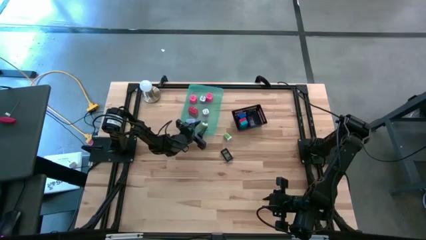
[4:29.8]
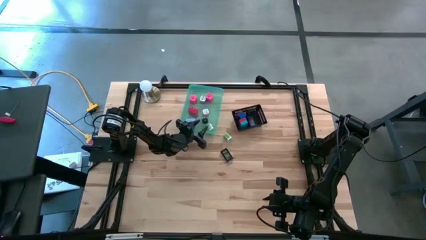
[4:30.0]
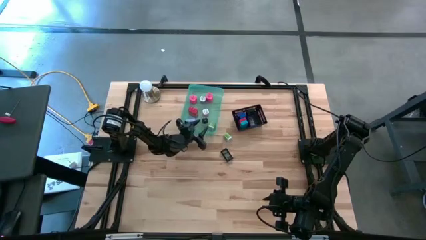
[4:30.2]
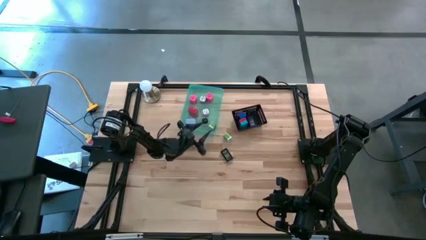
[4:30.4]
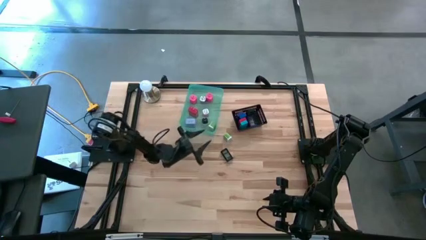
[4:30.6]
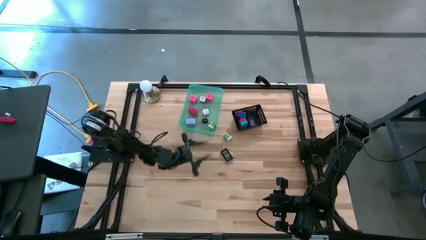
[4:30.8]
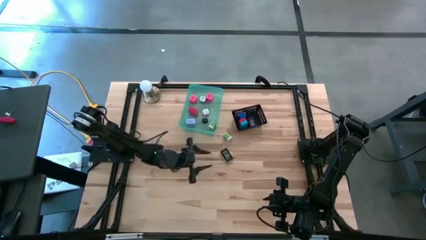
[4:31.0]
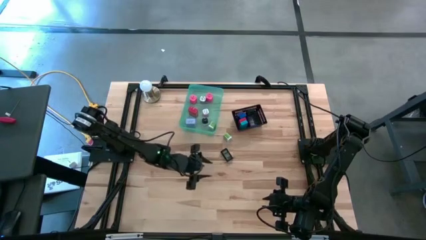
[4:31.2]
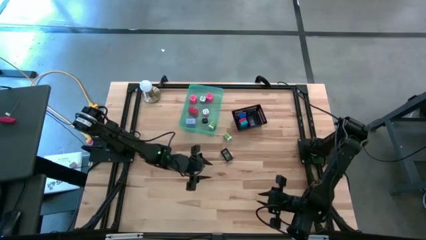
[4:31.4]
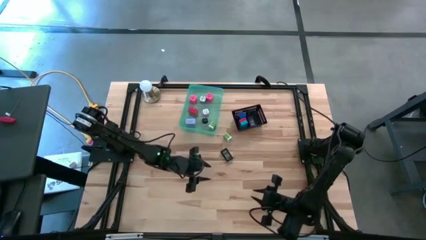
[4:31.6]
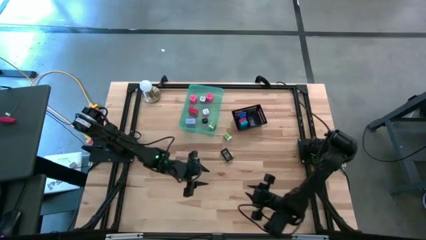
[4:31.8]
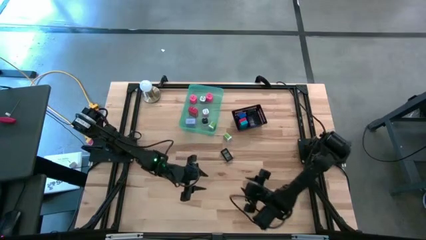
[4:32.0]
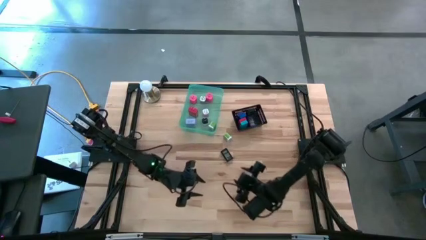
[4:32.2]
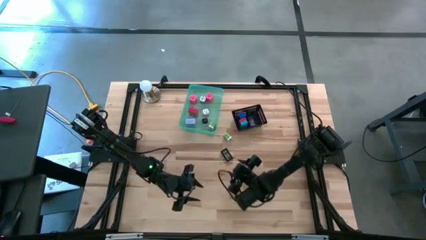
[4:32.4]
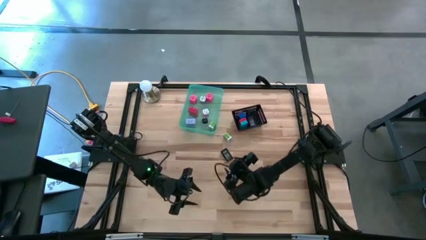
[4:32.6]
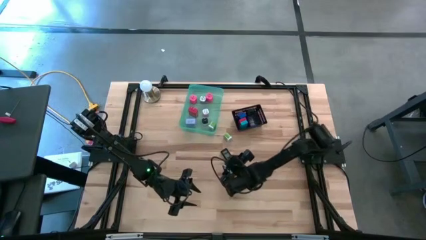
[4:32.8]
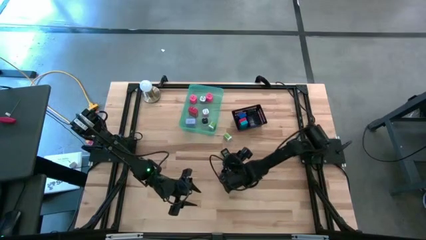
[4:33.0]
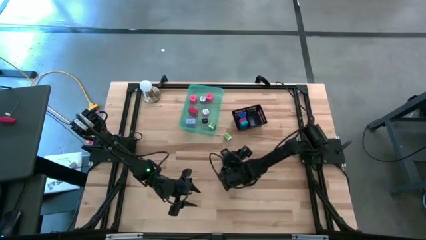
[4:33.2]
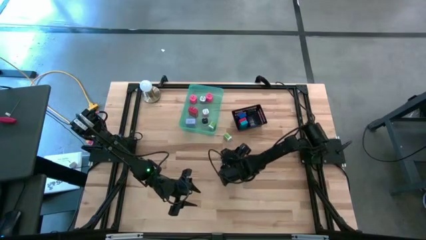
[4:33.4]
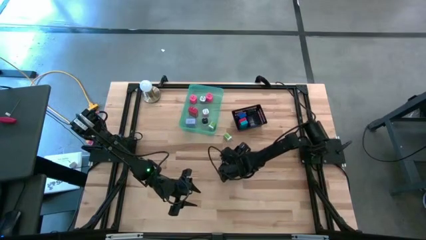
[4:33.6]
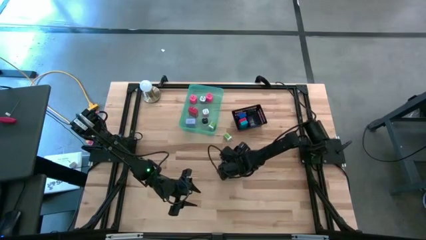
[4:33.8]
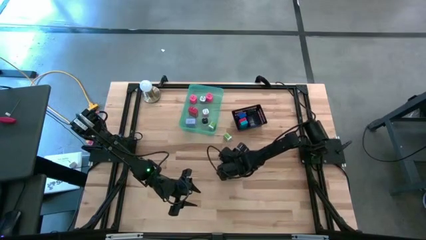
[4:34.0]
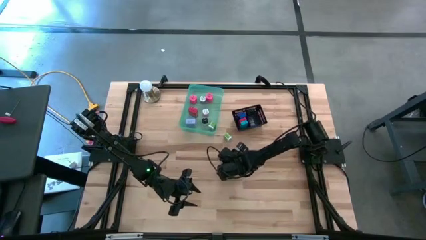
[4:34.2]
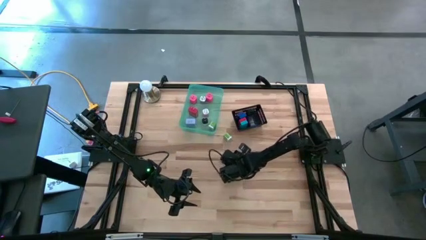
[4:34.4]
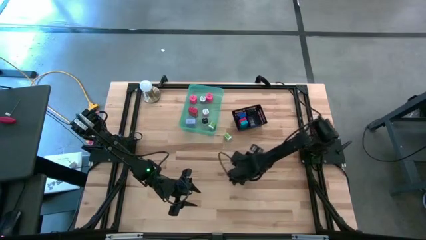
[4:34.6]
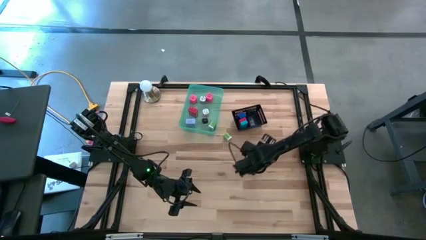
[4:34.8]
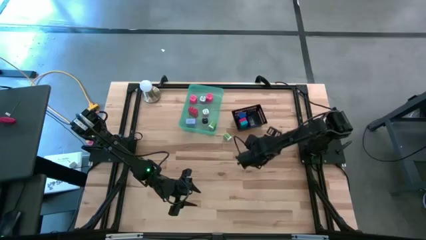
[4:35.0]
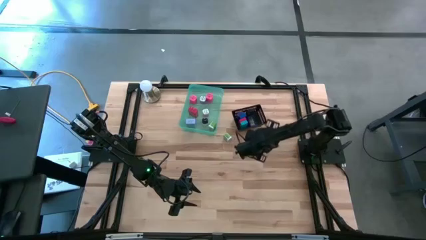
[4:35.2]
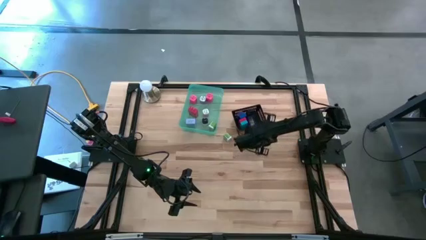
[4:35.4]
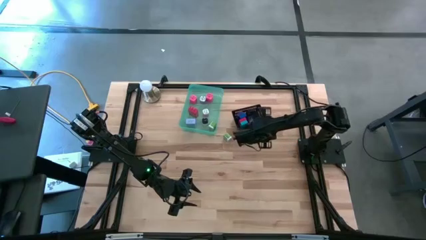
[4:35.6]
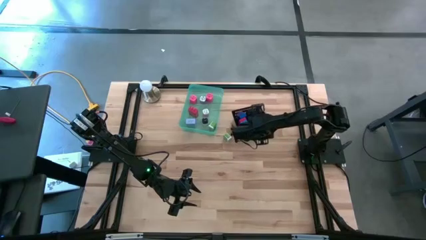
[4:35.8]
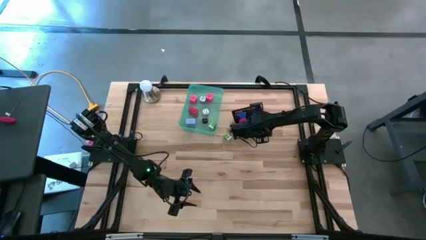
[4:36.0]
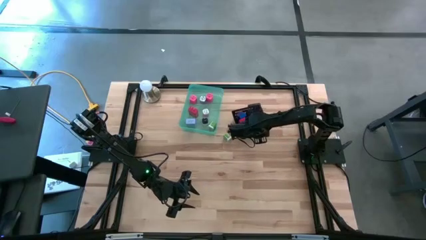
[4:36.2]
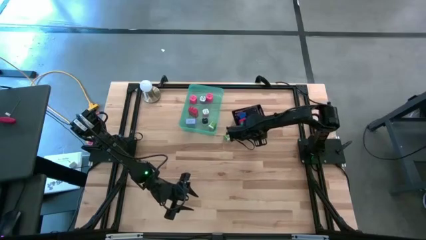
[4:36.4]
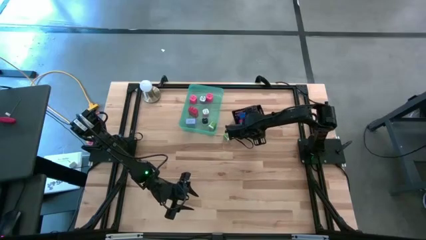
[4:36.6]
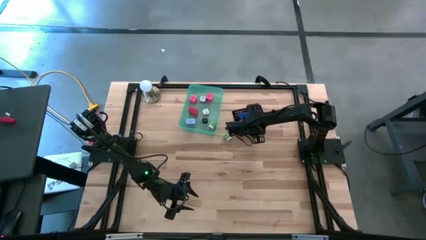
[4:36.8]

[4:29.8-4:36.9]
Task: Pick & Place Office items
Put the black digital clock into the black bin

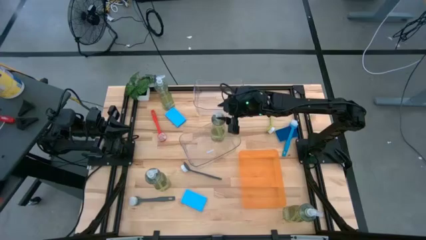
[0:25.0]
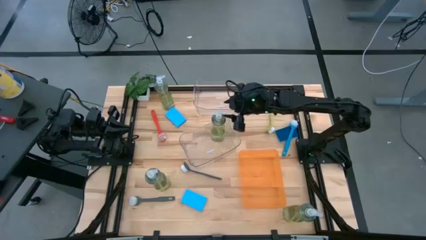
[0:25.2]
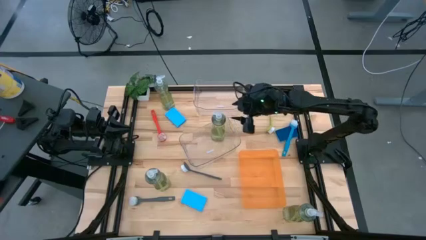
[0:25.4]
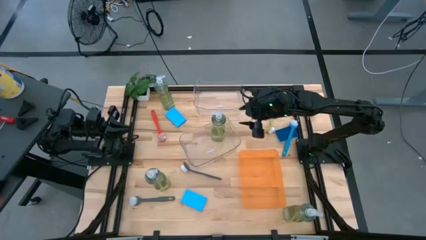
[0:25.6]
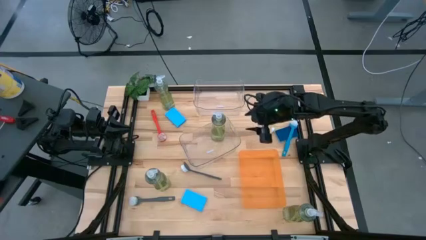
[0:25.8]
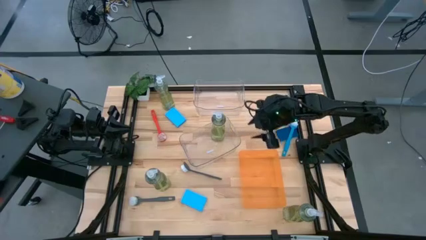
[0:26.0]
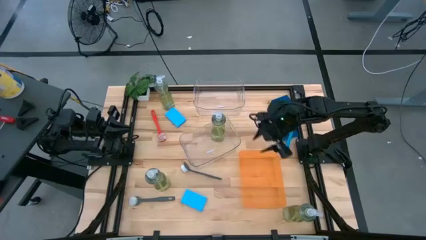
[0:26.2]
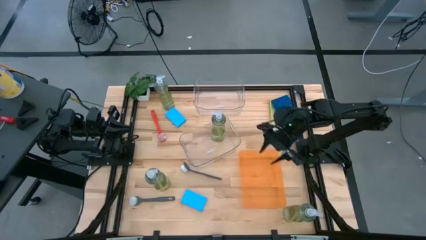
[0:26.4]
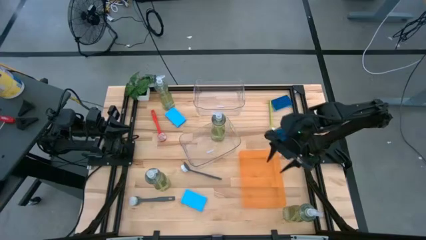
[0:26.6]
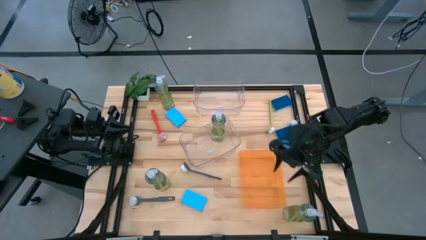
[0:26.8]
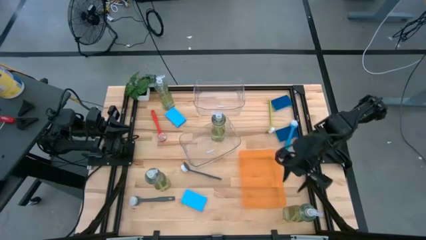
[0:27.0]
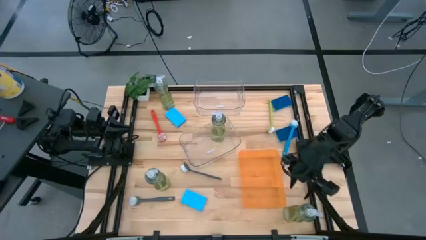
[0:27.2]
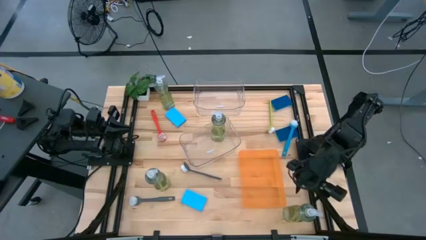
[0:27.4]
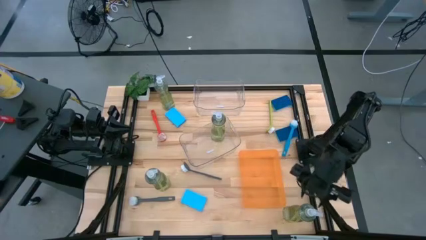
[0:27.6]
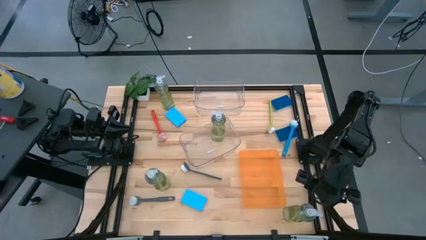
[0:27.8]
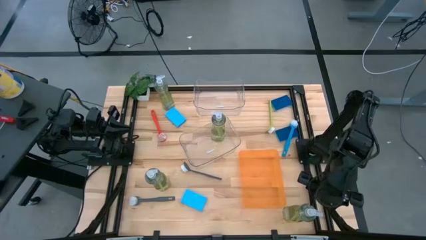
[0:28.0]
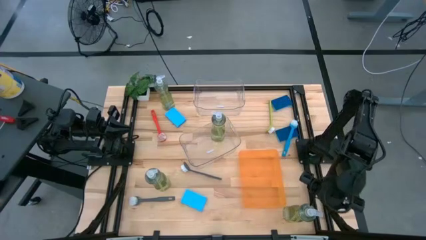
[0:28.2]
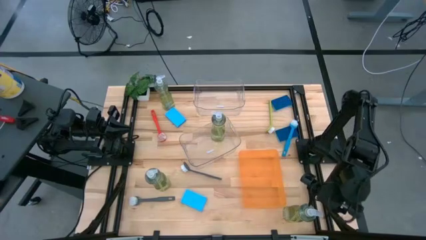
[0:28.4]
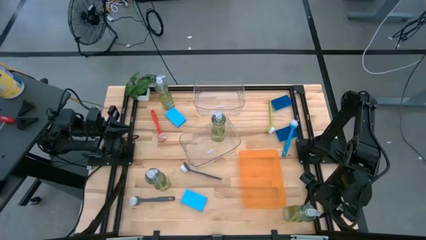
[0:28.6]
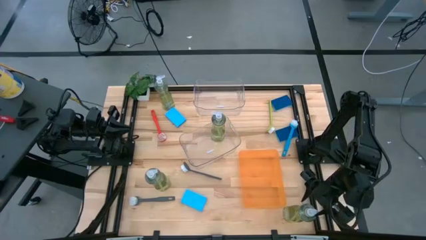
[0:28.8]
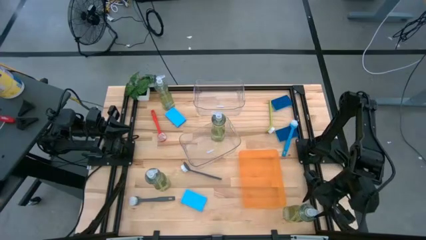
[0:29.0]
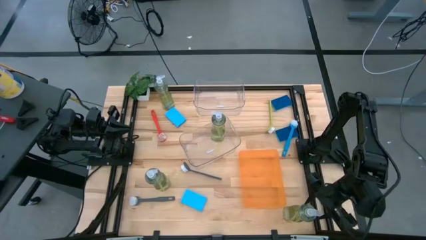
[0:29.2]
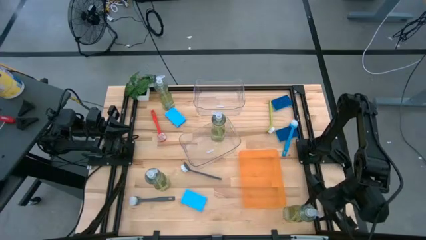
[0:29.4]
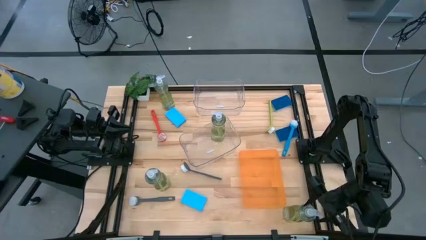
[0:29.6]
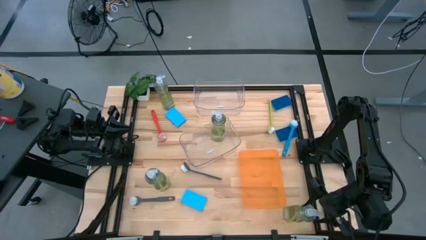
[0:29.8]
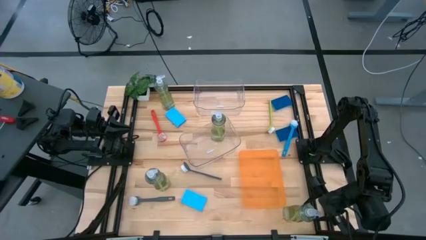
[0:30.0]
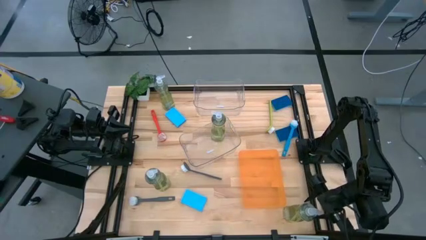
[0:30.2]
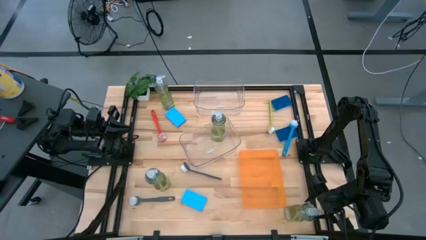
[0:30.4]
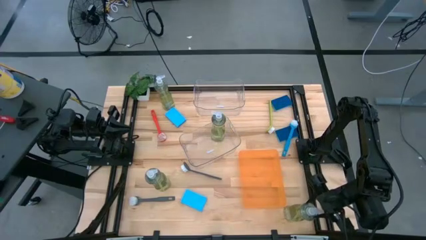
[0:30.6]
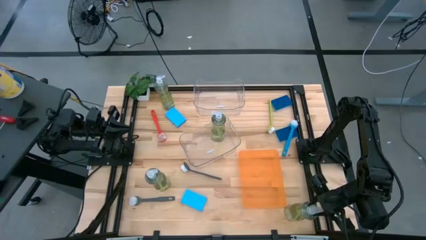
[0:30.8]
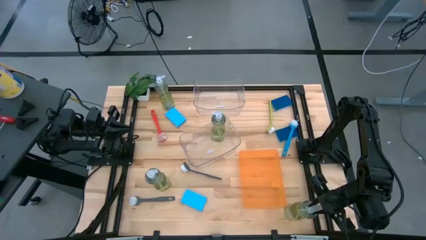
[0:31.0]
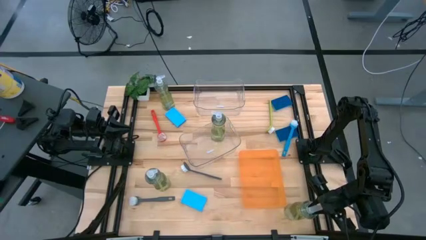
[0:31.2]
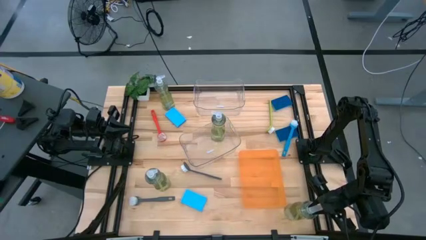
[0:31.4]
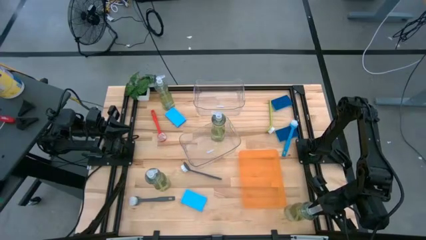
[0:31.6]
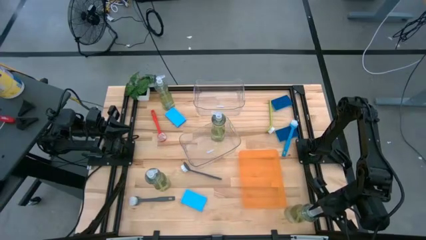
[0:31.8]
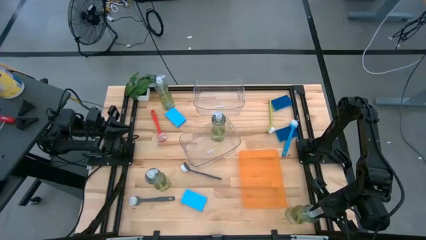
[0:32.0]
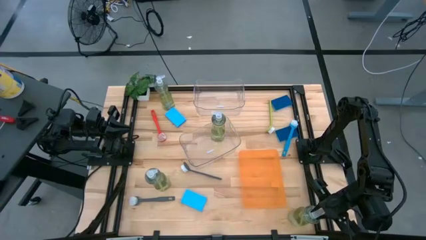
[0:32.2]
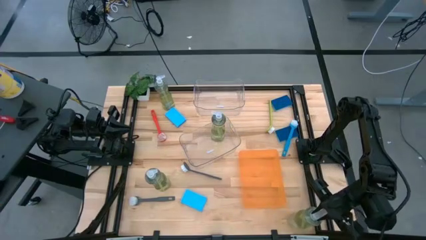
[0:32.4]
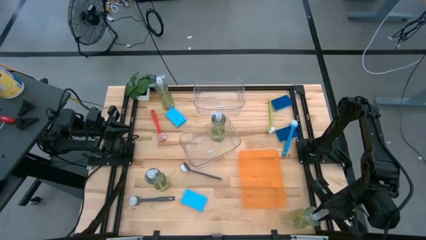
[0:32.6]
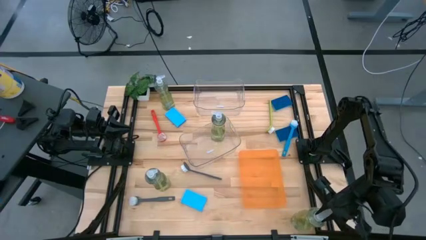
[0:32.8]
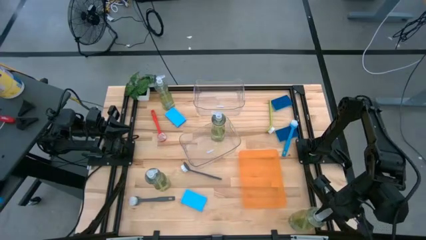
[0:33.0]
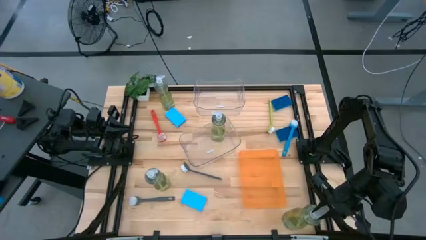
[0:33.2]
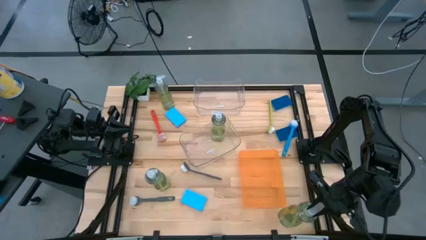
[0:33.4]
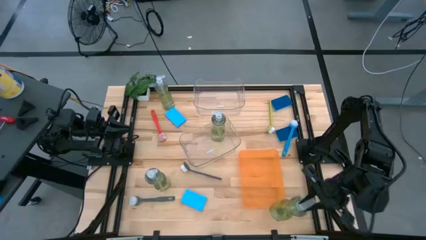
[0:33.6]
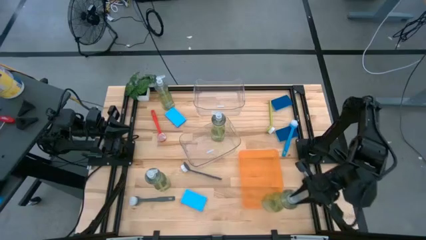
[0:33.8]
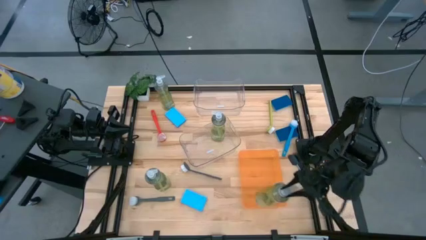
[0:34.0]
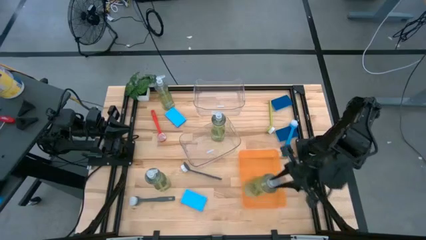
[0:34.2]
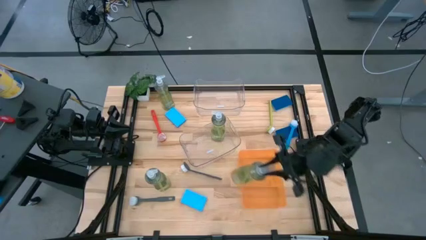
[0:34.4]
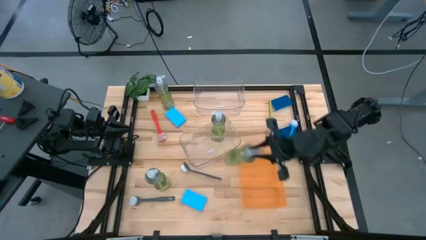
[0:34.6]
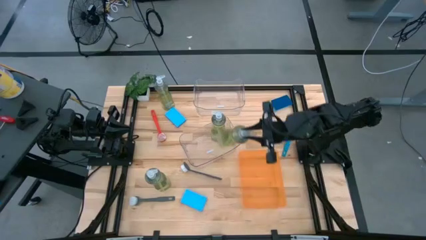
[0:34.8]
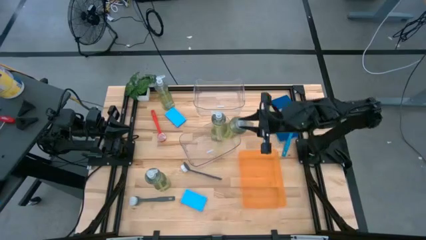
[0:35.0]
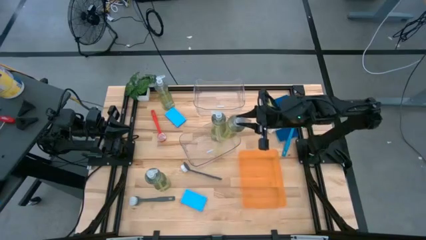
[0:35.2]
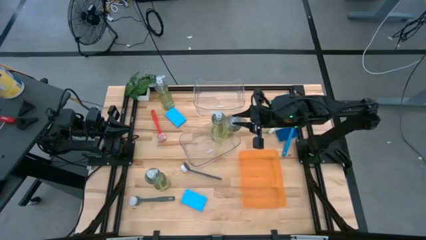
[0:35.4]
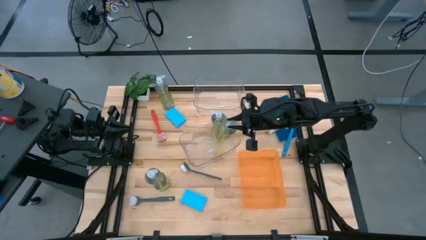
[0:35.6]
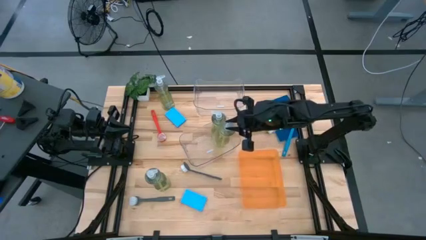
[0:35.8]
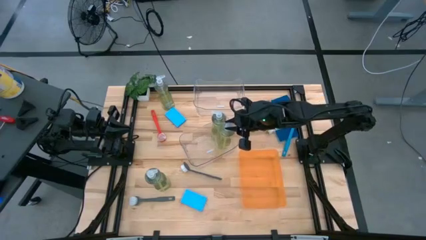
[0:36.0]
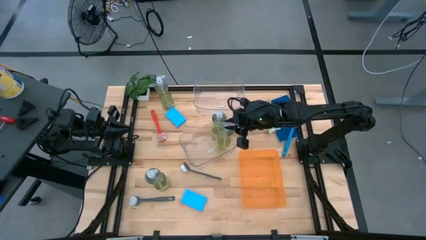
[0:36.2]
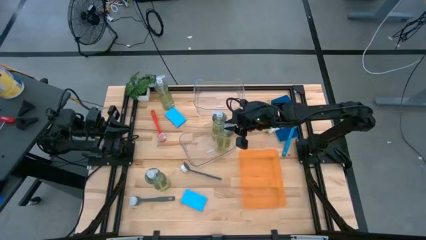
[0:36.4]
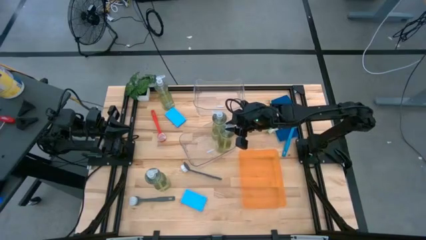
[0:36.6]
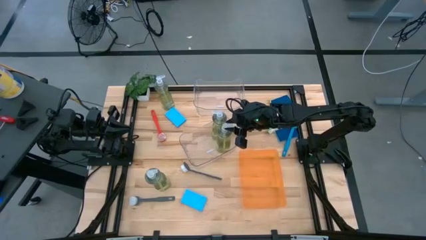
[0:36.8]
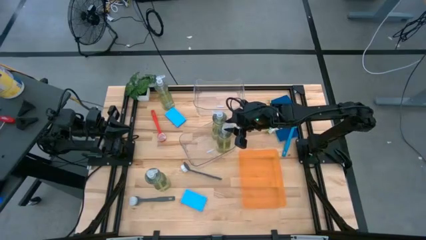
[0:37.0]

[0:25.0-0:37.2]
Task: Pick & Place Kitchen Sink Supplies
Put the green dish soap into the bottom transparent bin
